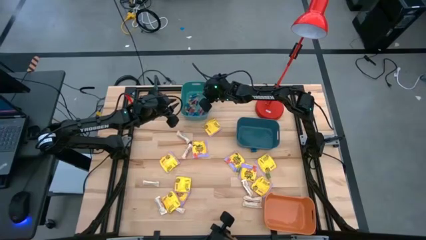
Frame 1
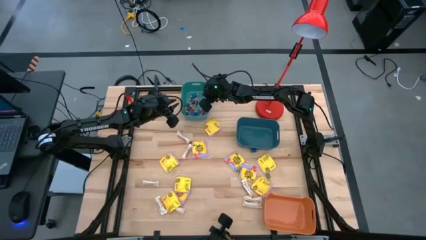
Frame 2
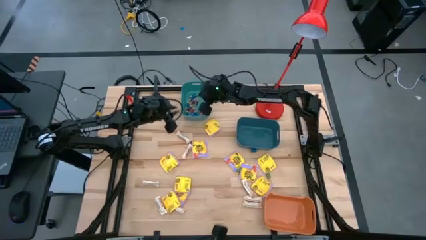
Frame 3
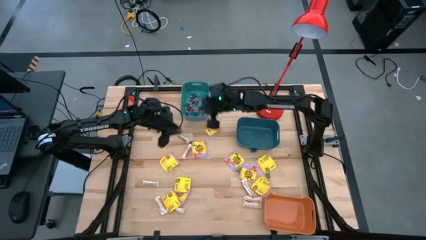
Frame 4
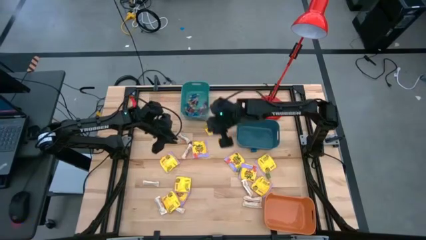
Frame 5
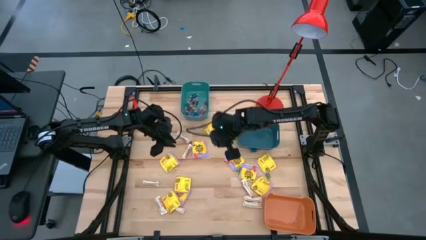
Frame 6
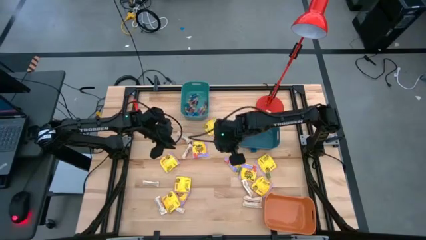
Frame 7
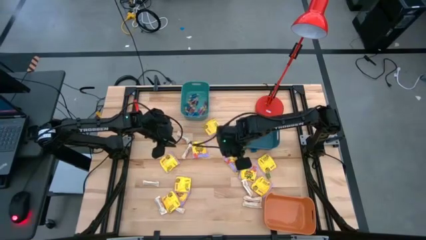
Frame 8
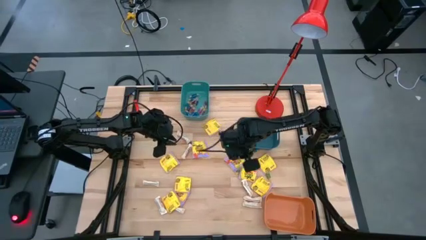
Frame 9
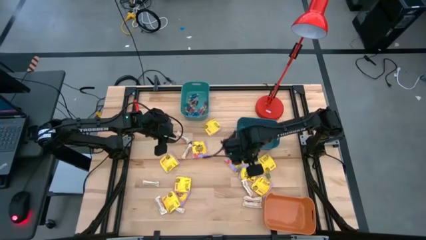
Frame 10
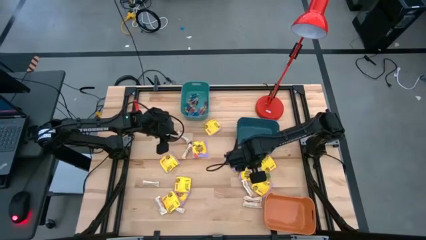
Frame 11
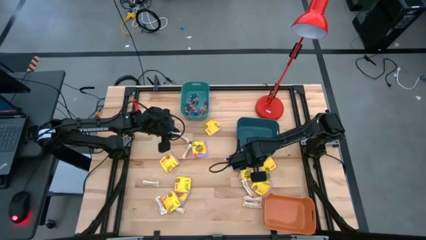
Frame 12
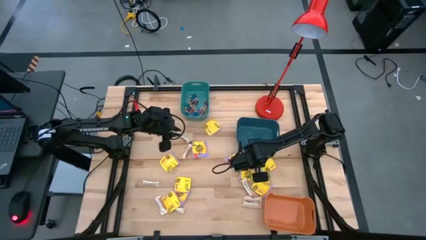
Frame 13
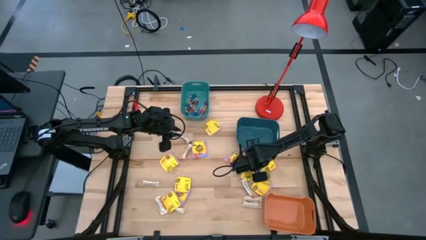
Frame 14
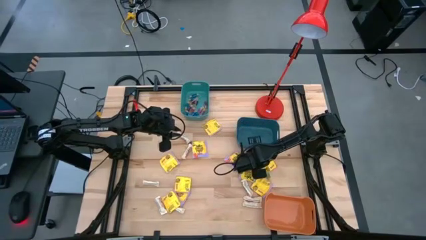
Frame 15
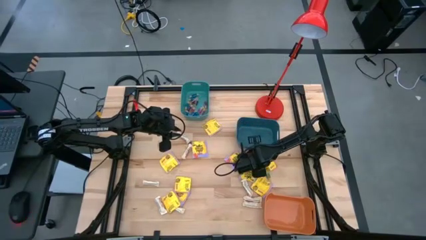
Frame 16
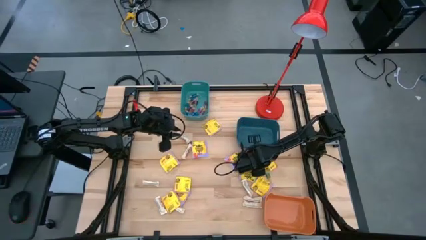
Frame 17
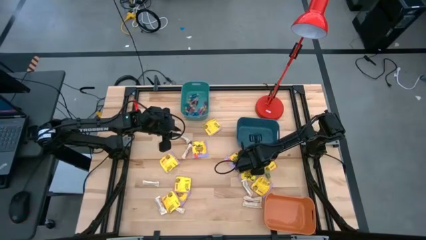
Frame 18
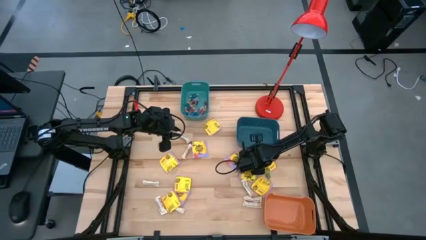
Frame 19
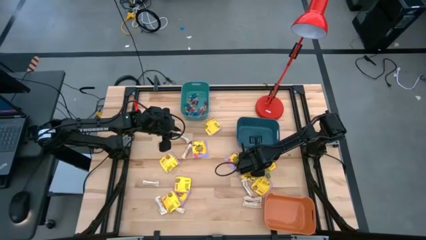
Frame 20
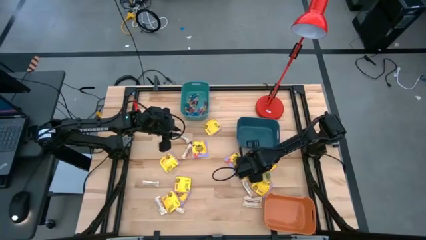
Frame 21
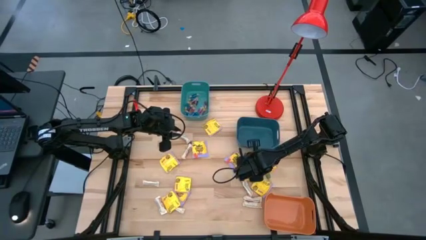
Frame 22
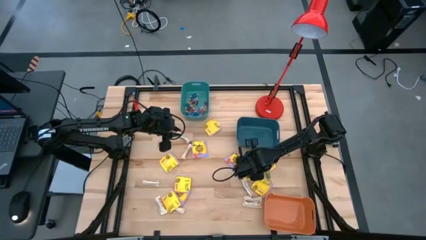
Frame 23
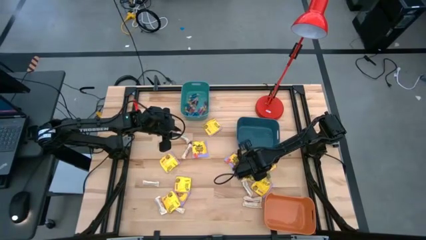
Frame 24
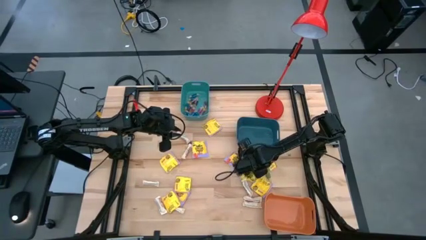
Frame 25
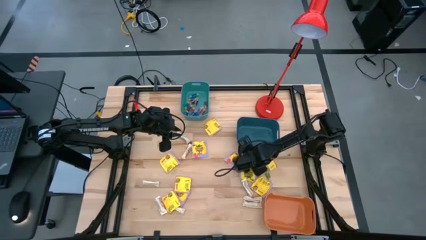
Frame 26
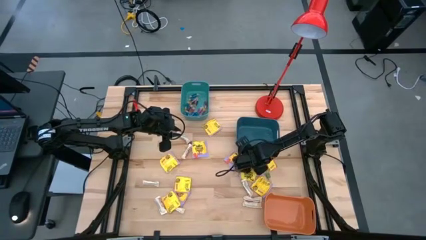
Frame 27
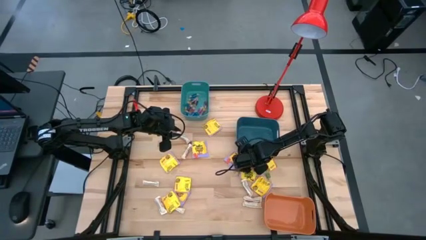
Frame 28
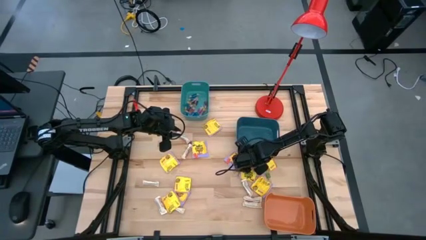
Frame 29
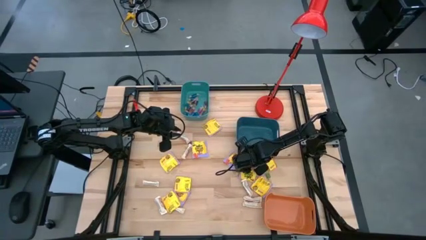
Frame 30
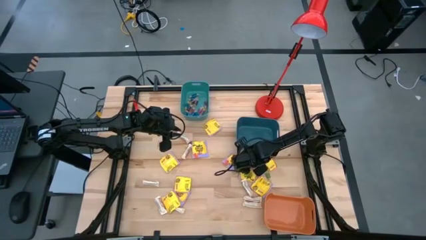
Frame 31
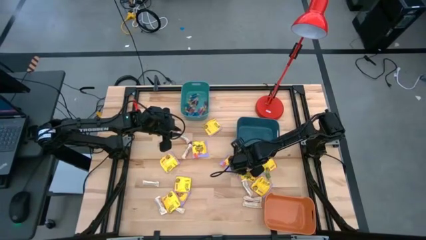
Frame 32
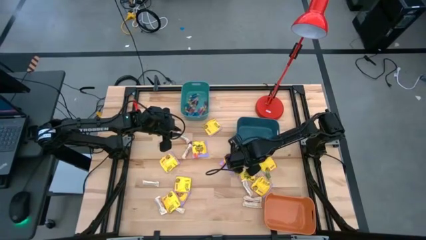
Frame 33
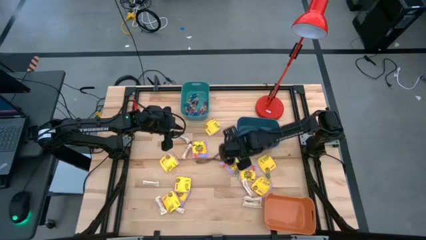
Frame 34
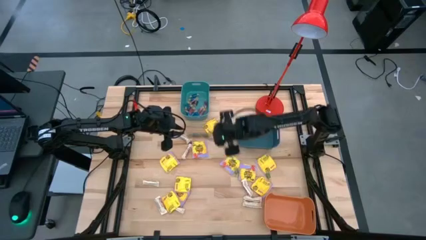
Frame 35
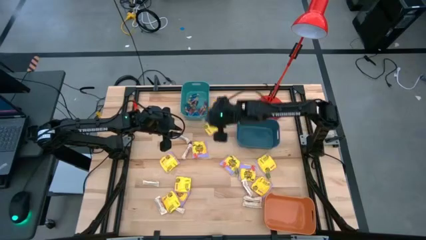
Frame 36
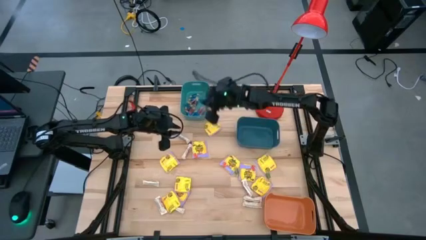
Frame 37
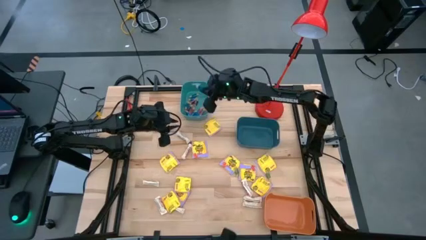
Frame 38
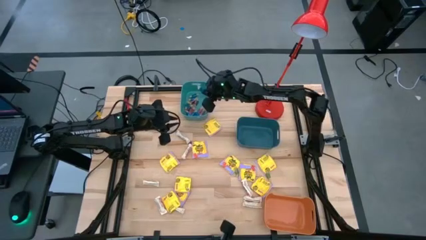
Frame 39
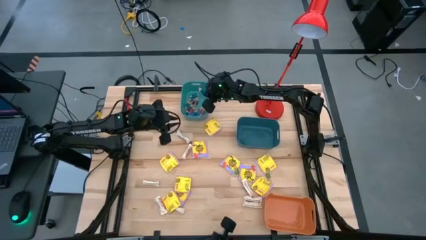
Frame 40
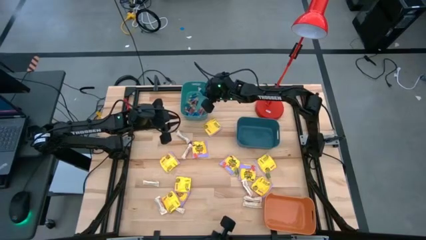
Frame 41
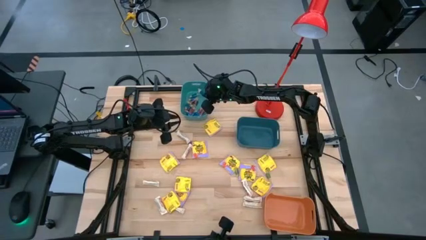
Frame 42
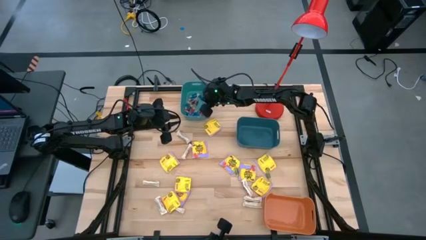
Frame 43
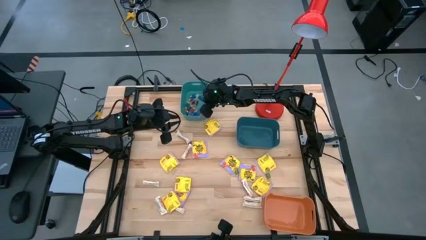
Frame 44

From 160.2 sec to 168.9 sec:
Task: Sort candy
Put the blue candy into the green bin

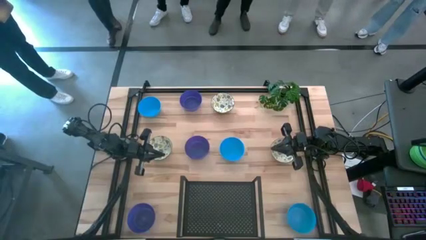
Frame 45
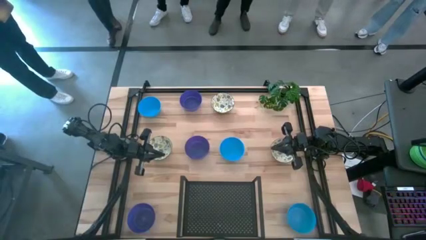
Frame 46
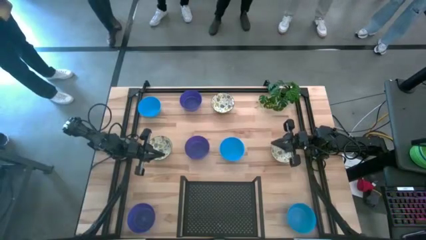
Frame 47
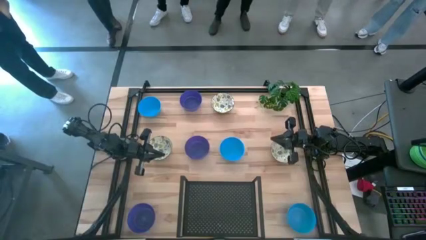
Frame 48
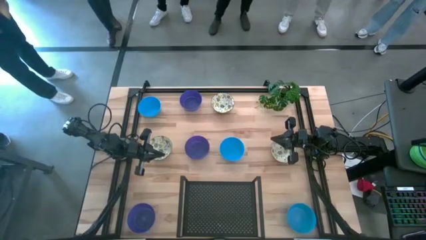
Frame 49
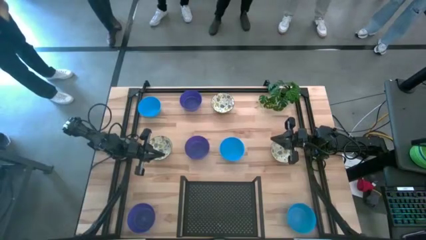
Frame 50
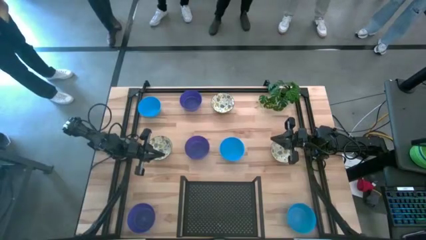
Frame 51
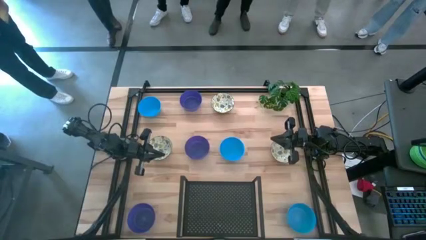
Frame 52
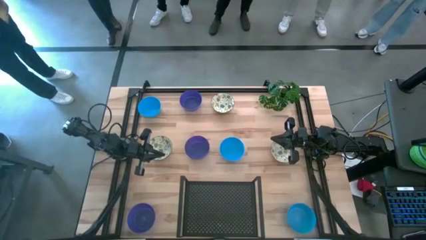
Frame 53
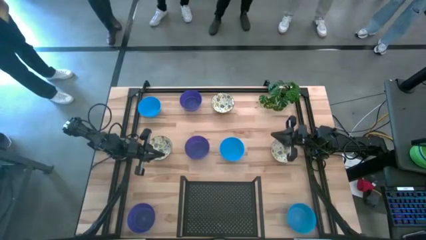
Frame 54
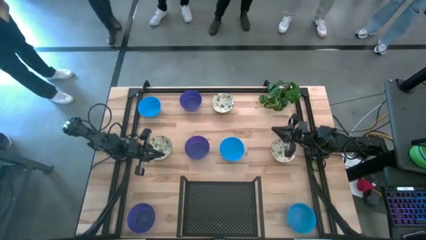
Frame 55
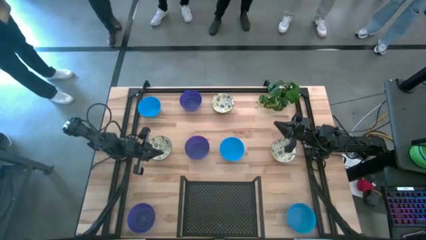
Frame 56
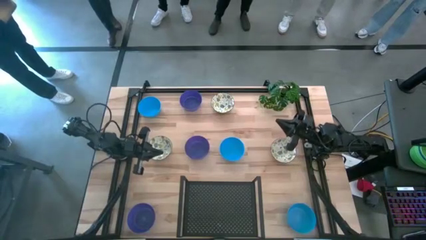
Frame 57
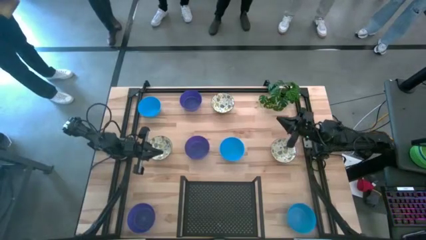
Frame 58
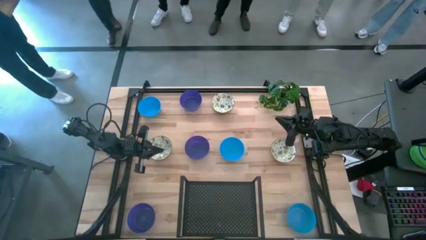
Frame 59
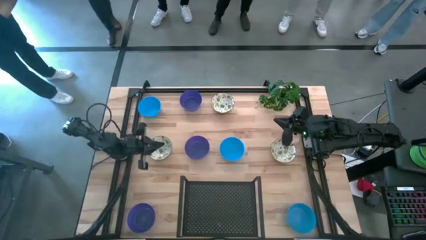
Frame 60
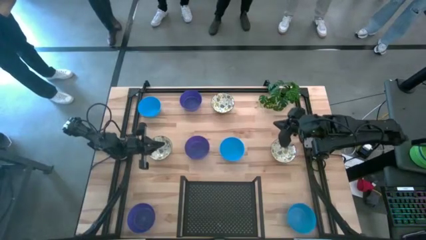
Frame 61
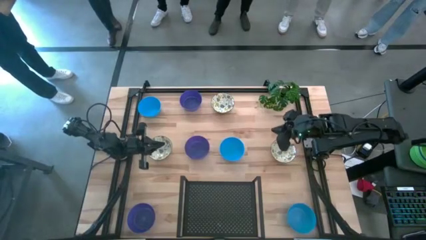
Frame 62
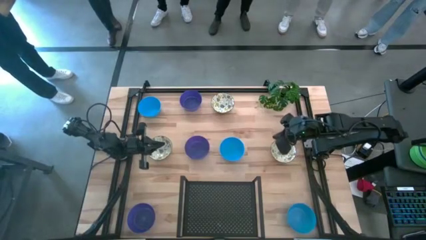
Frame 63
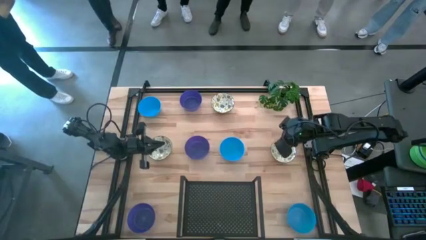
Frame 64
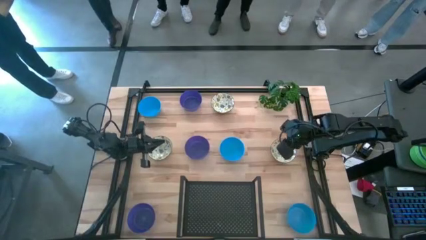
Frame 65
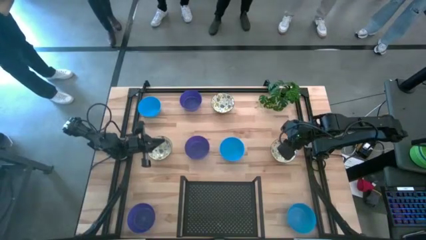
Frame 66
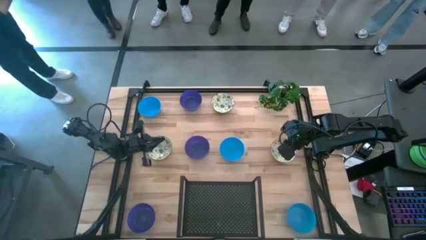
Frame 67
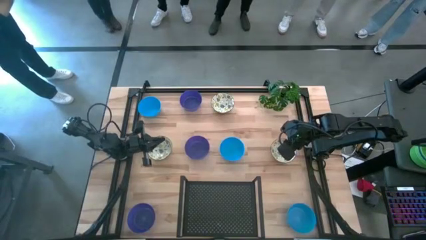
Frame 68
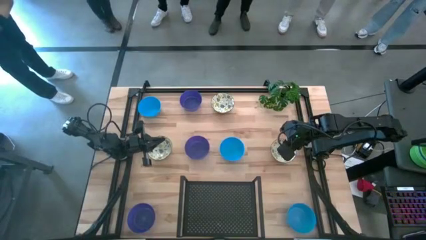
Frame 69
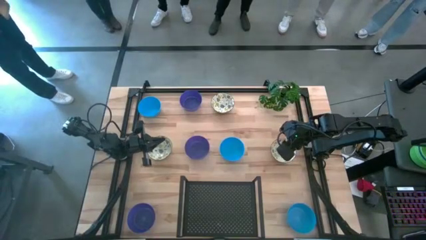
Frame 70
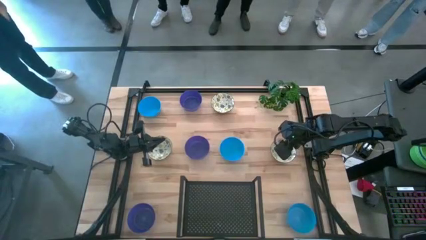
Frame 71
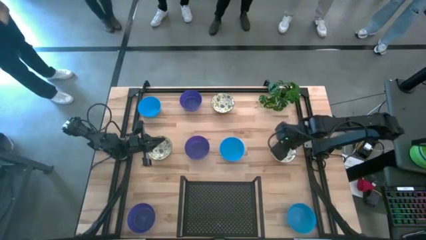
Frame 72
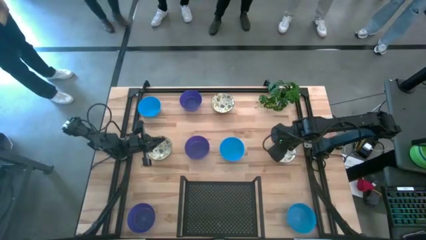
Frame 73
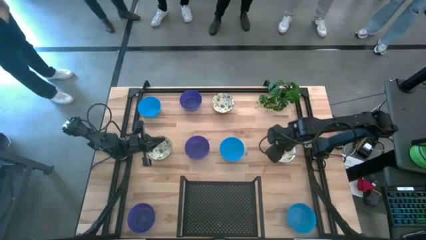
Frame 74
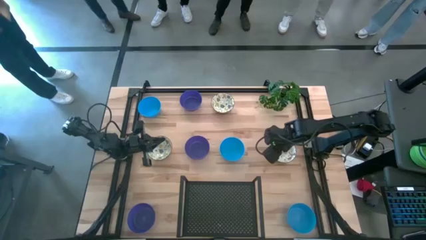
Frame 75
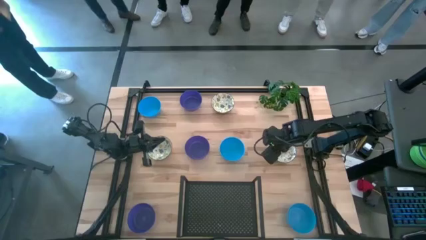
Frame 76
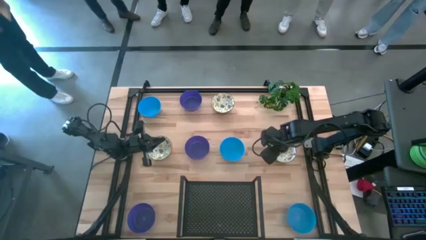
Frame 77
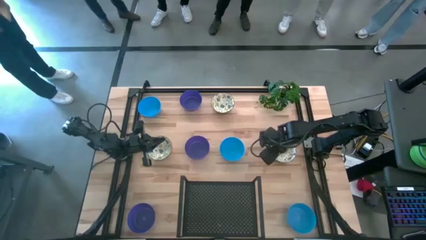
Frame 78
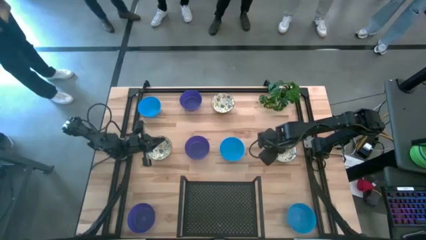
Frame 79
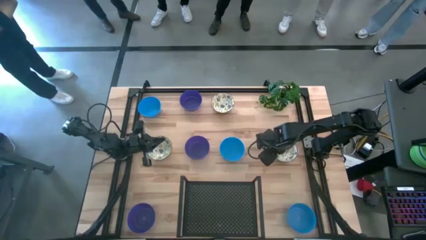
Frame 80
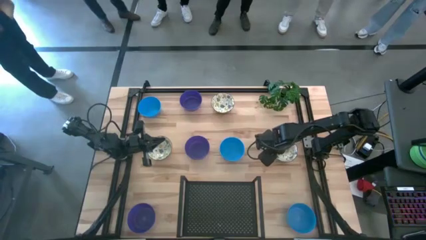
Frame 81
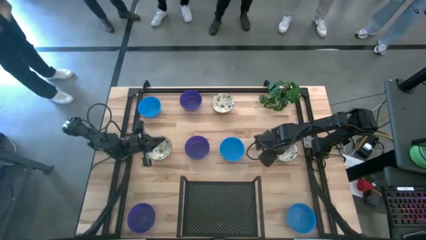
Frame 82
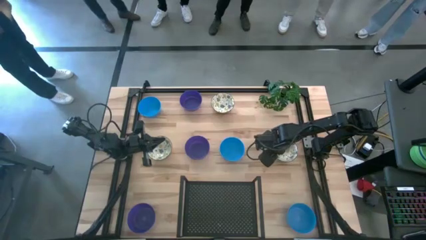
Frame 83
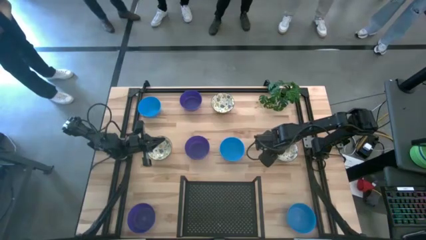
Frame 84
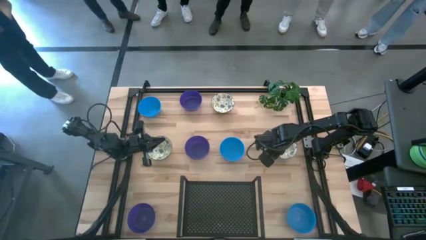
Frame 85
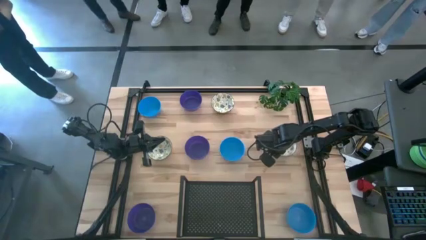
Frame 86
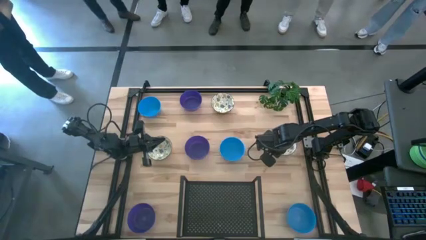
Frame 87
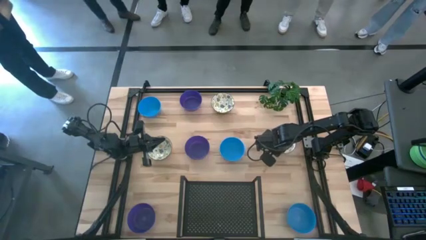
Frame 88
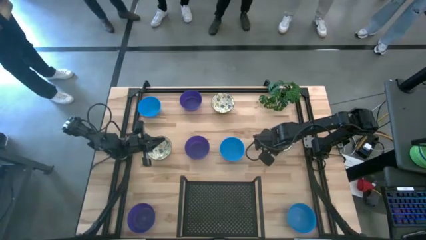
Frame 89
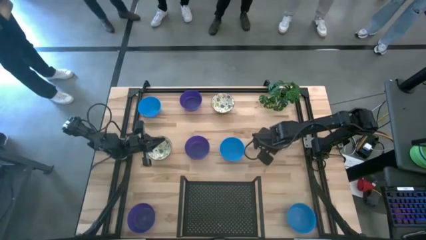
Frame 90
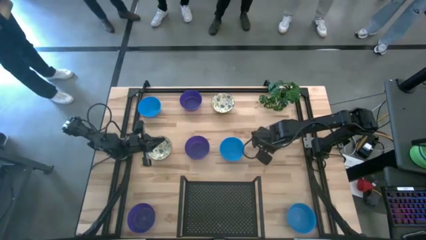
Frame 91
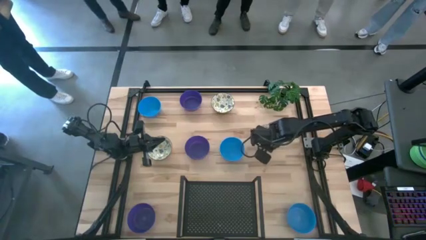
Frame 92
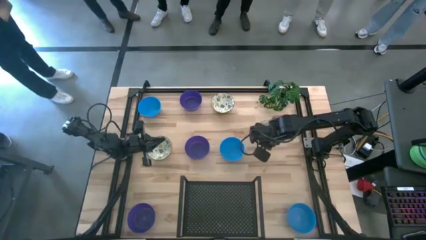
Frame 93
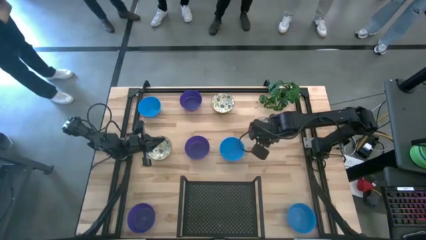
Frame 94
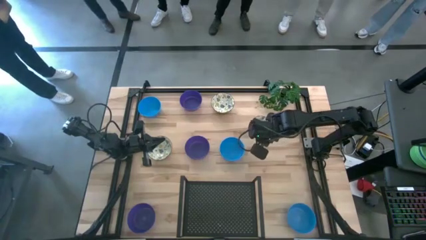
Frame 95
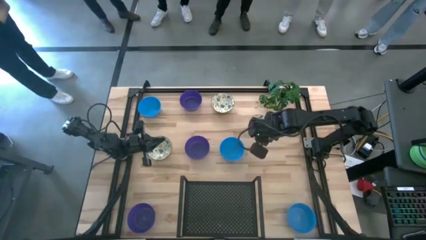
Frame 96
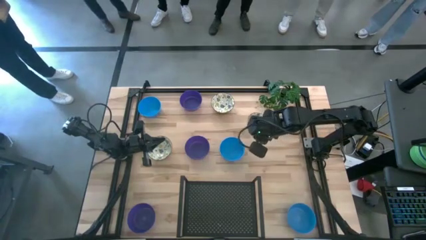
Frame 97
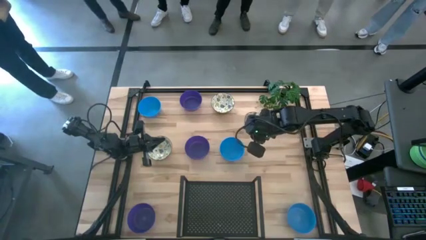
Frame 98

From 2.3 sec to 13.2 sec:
Task: Pick & Place Mini bowls
Put the right white patterned bowl on the shelf
